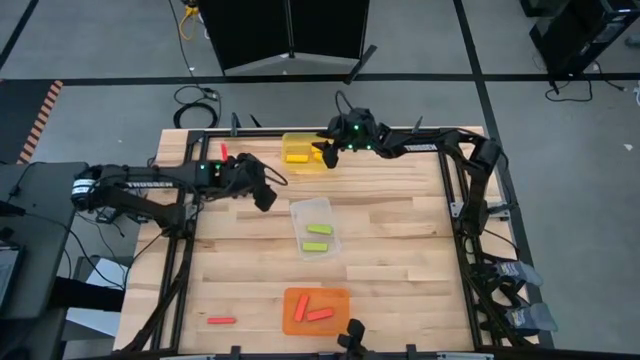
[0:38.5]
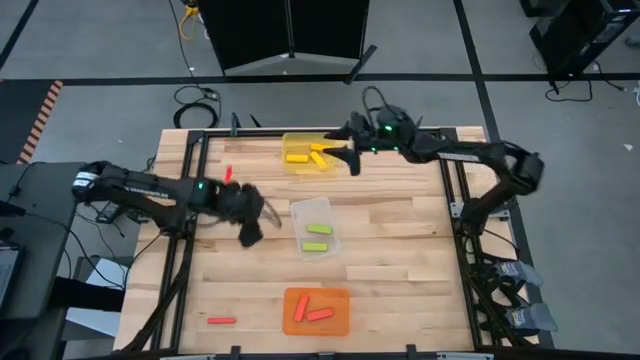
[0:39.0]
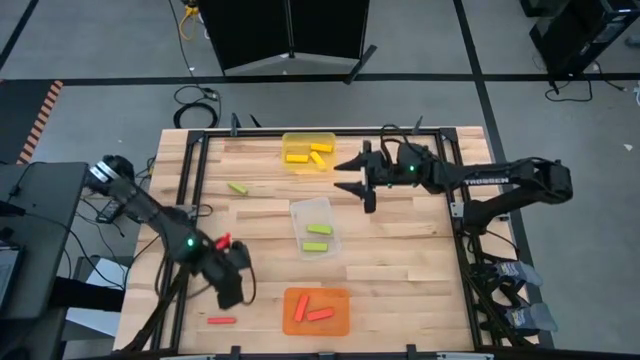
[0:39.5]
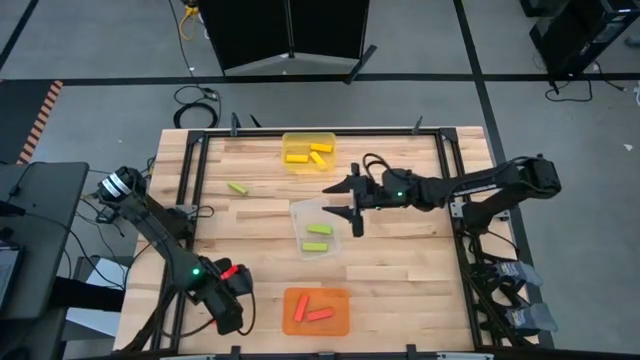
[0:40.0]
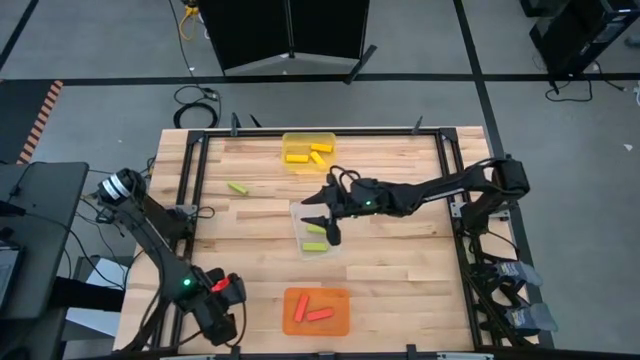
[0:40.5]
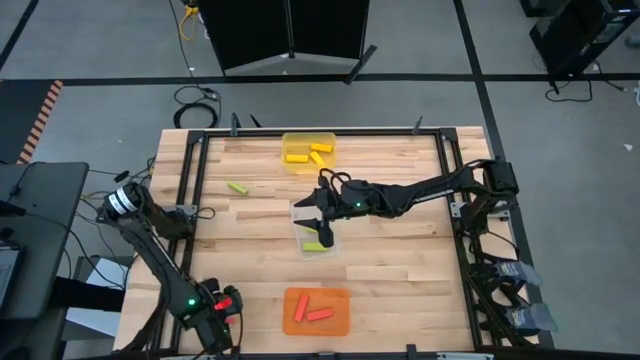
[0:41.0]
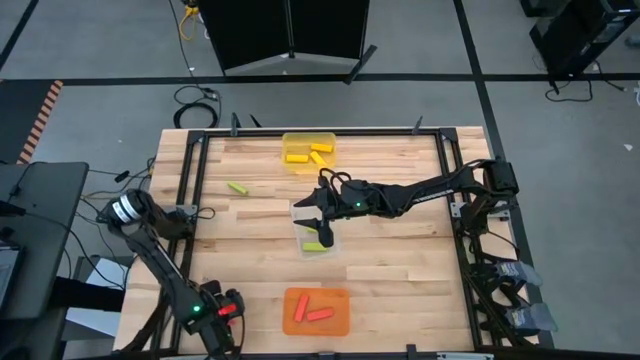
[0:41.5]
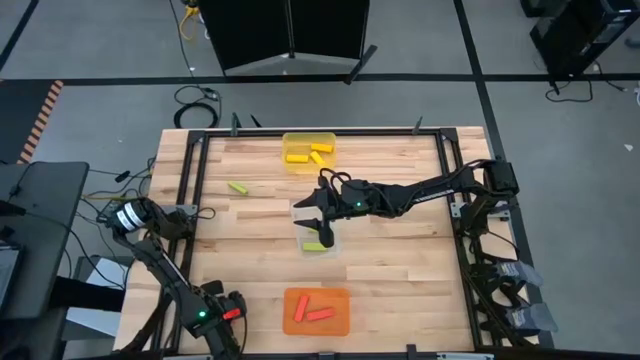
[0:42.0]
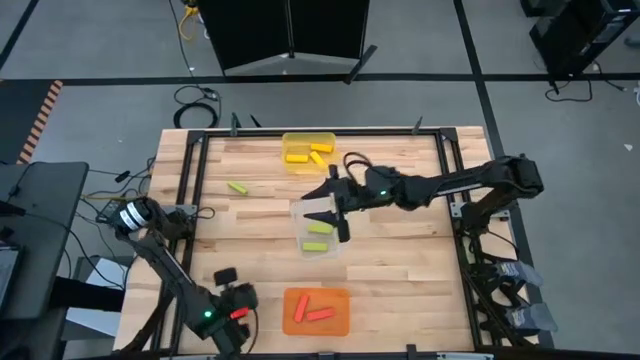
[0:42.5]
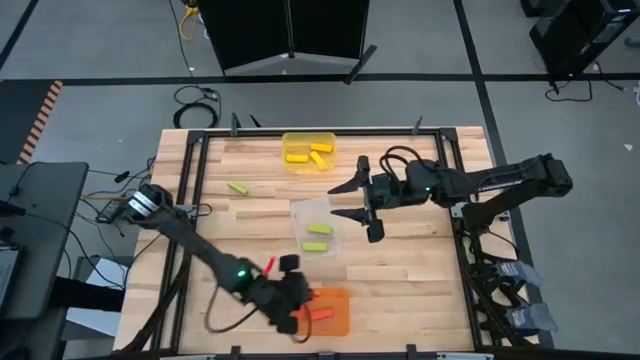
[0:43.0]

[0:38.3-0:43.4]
Task: Sort blocks
Put the orange block into the orange bin

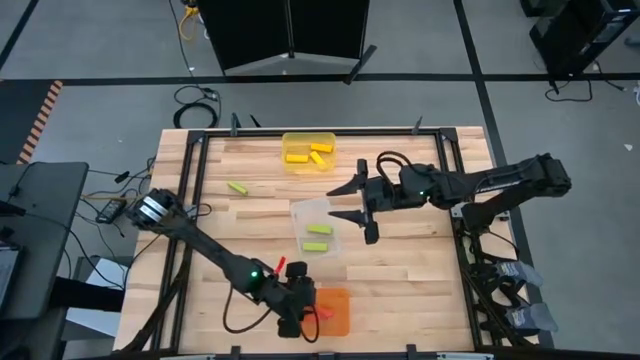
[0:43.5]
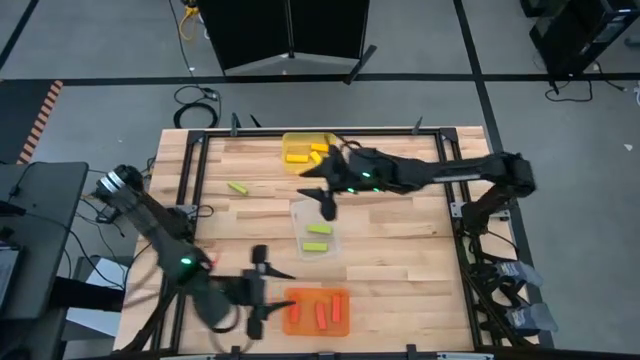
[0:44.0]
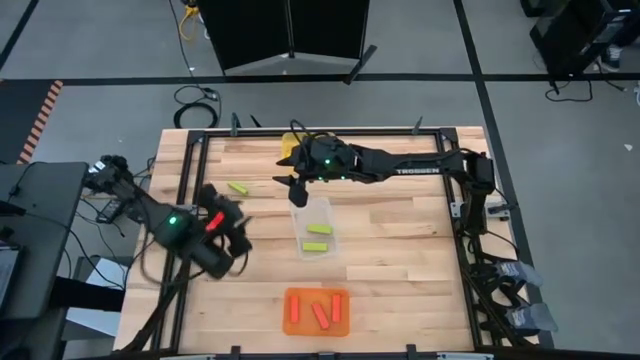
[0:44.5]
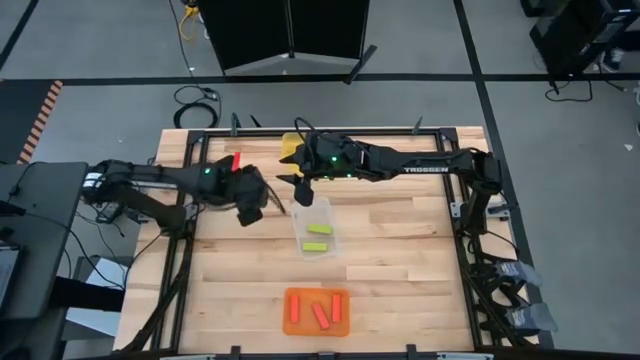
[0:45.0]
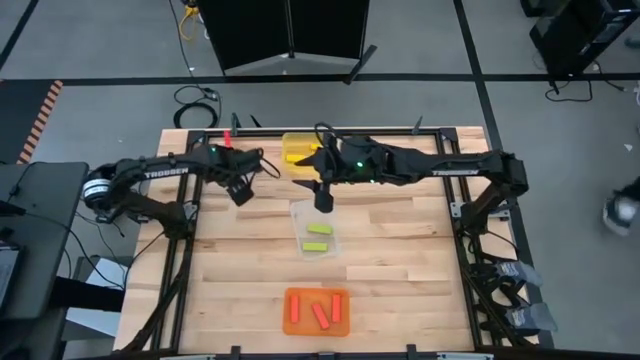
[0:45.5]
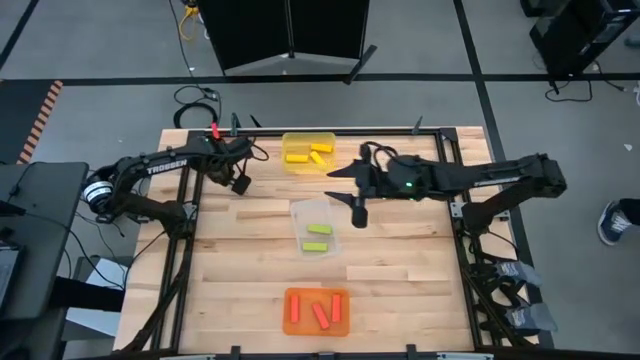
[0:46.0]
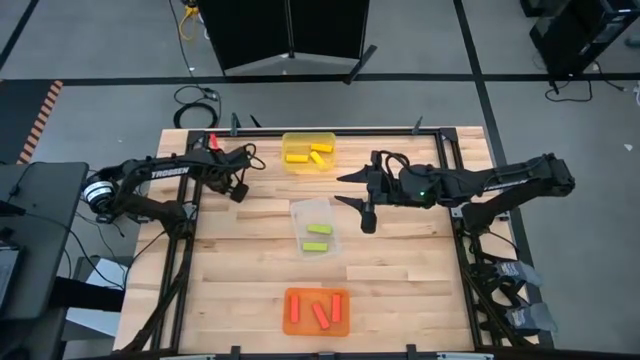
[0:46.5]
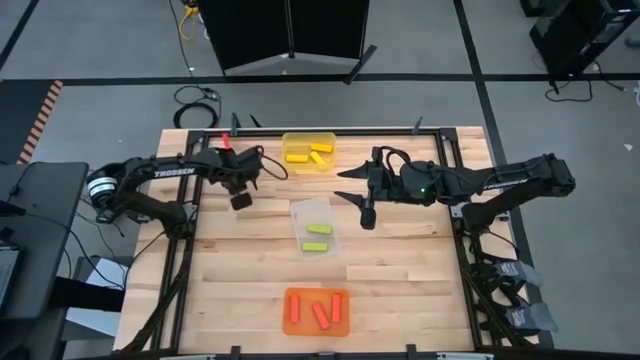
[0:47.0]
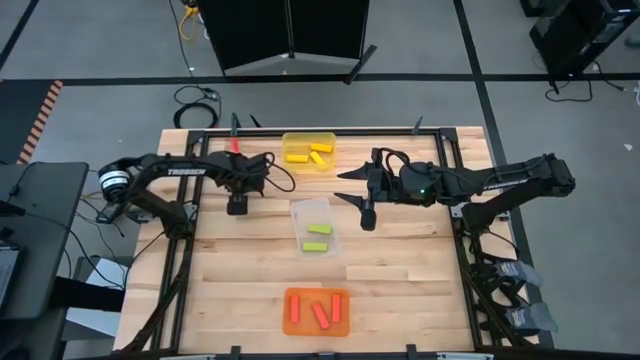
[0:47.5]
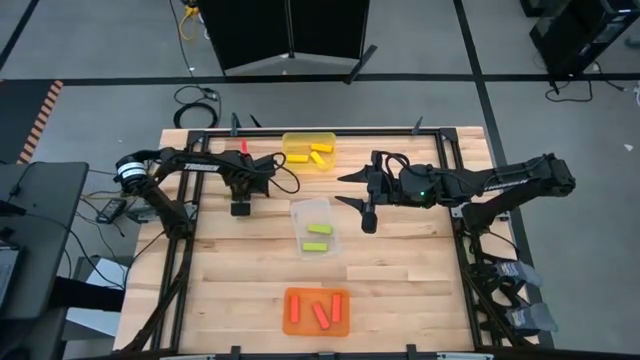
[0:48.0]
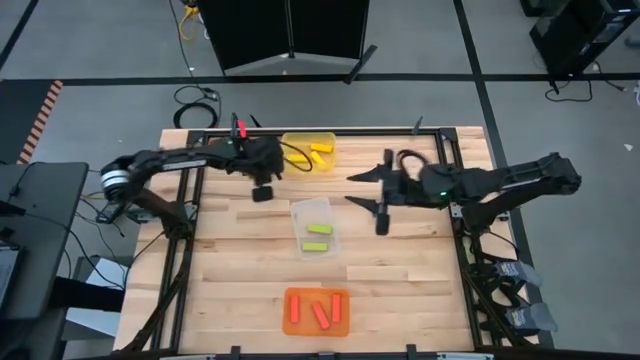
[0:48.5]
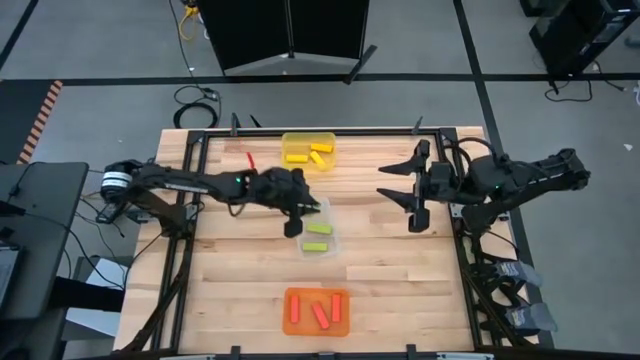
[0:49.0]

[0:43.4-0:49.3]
Put the green block into the transparent bin

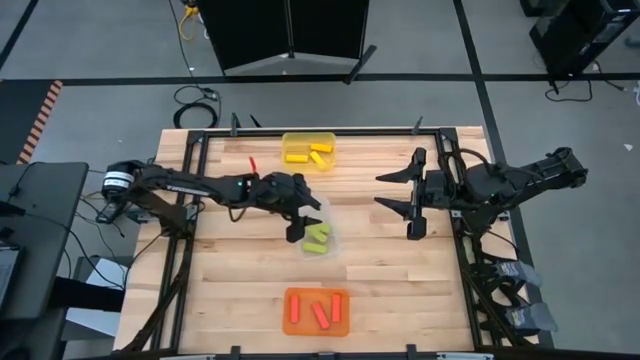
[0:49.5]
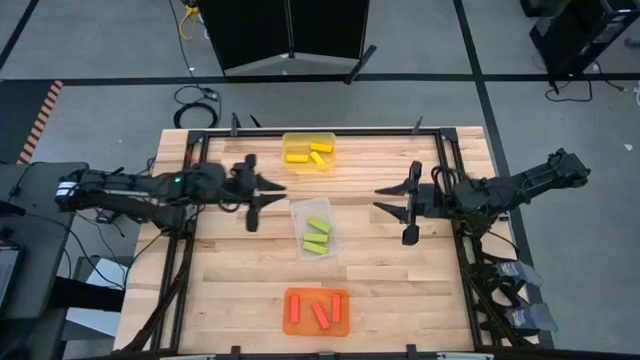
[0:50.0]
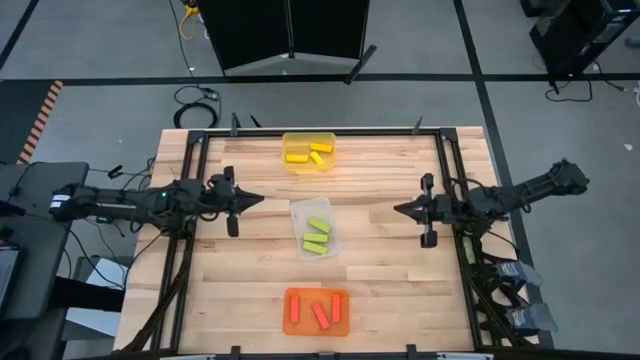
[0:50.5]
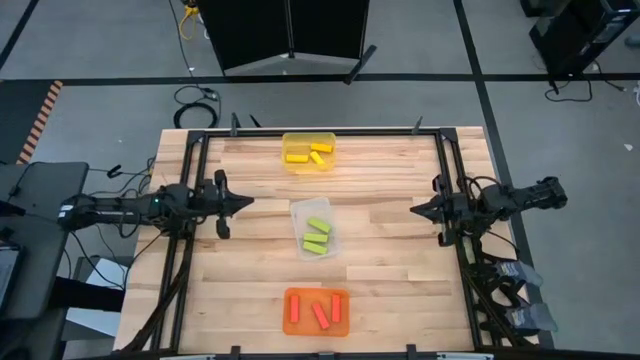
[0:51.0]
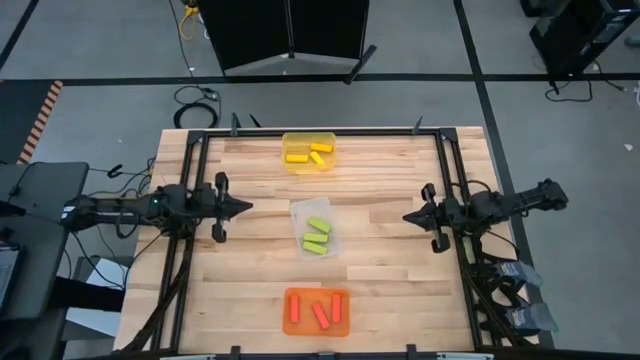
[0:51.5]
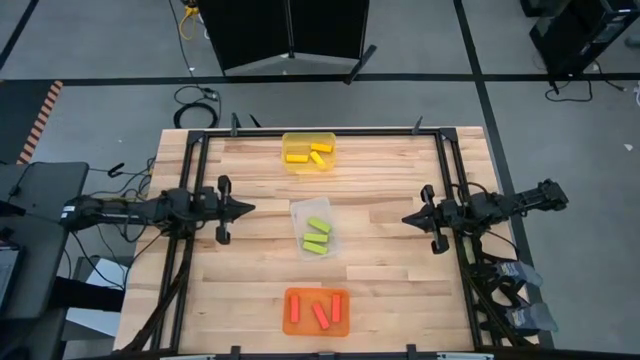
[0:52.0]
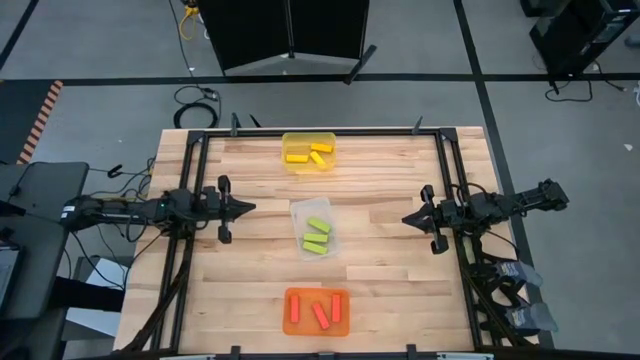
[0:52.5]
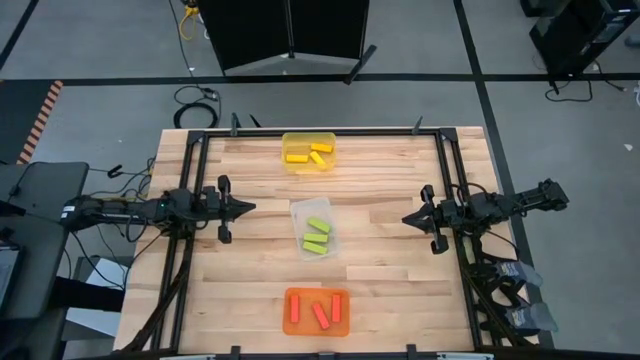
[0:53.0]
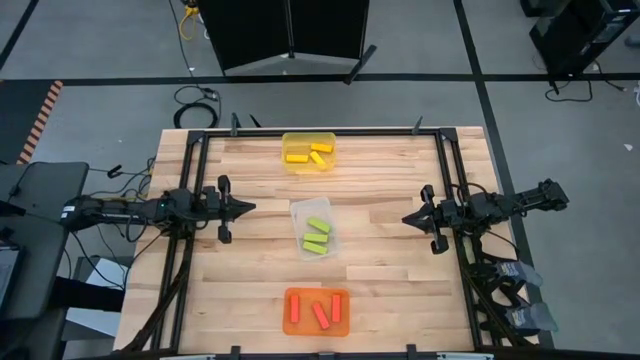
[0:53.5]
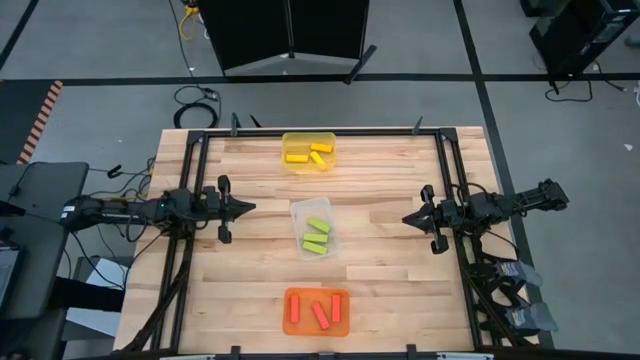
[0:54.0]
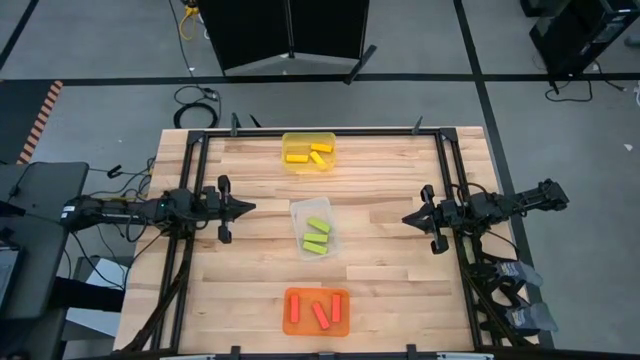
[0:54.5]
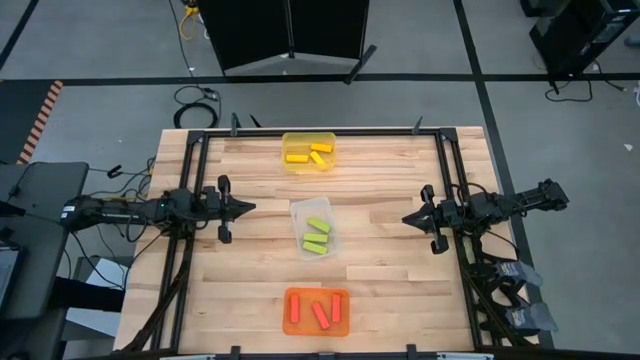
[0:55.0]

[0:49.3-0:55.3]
Return to Home Position

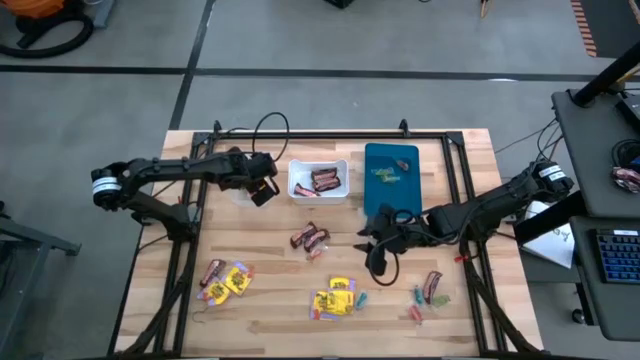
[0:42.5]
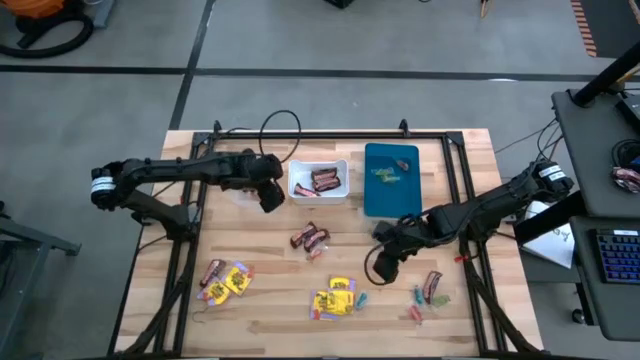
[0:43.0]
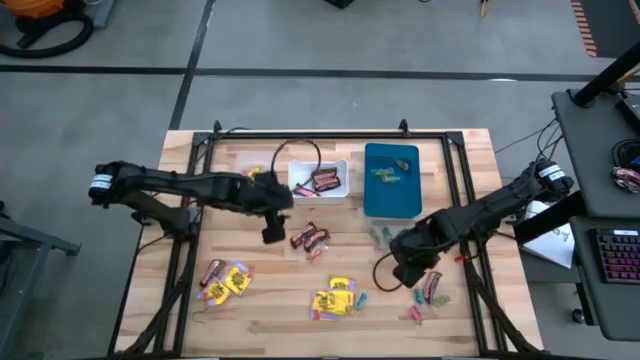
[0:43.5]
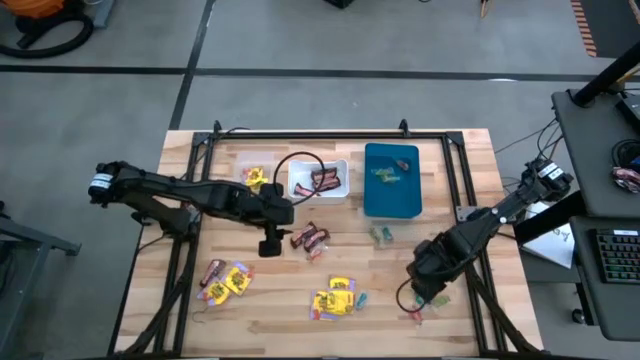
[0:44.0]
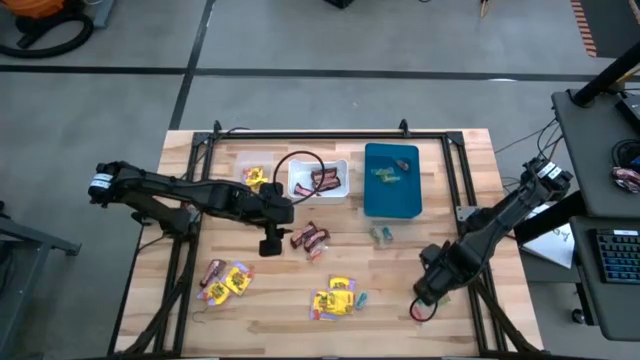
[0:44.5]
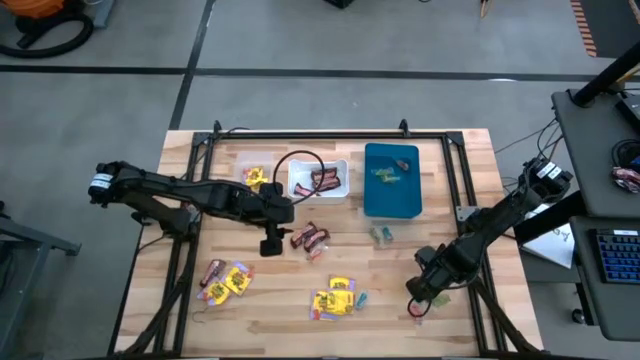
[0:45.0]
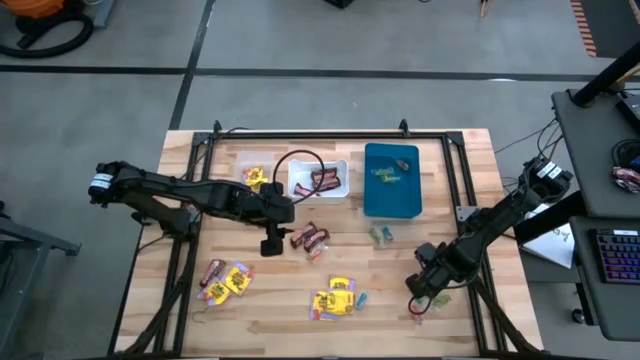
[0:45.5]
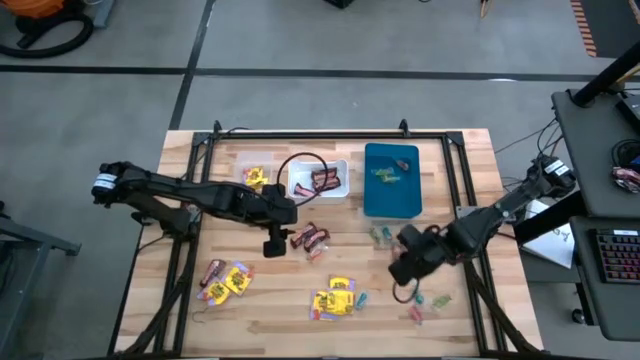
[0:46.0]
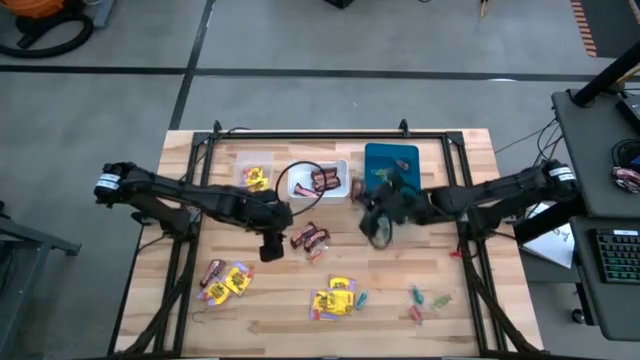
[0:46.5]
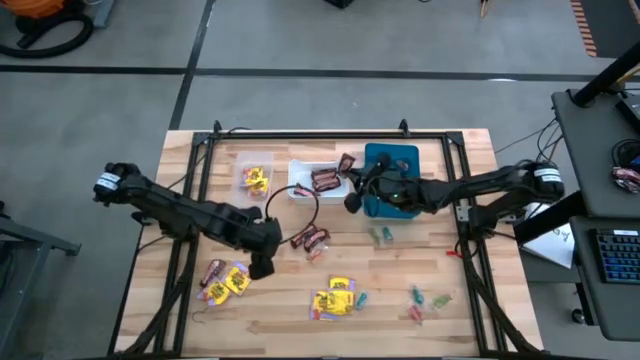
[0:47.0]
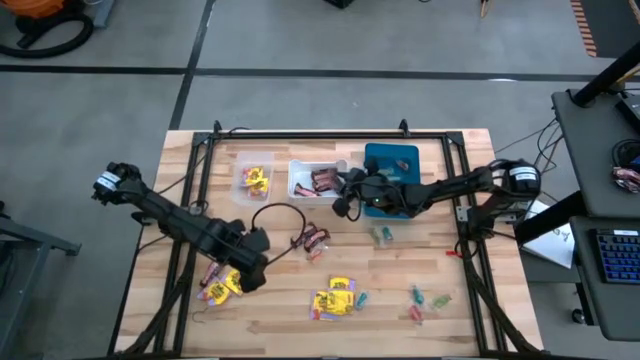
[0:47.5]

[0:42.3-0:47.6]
Task: Sort candy
Put the brown chocolate into the white bin
